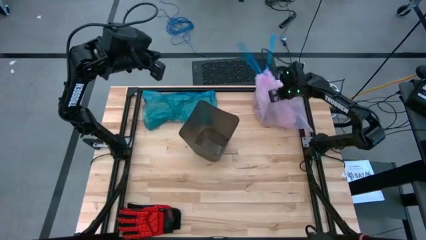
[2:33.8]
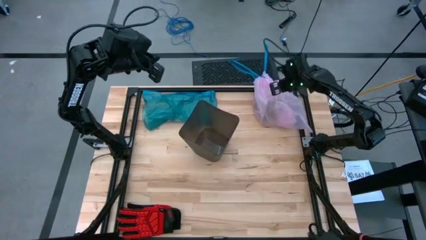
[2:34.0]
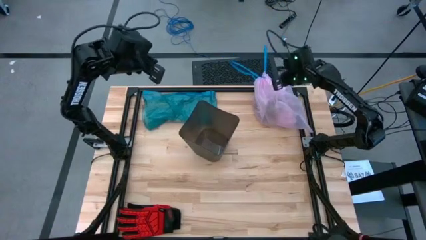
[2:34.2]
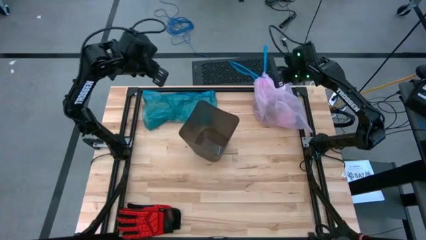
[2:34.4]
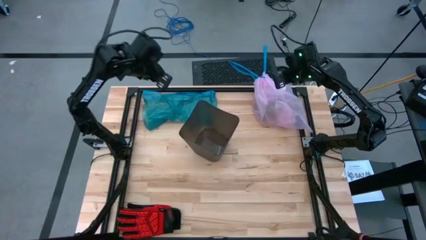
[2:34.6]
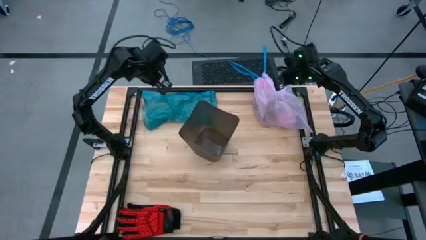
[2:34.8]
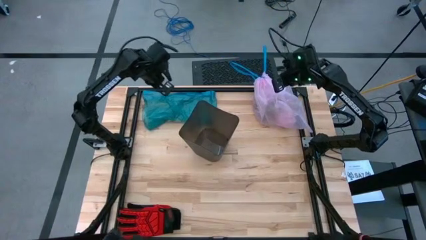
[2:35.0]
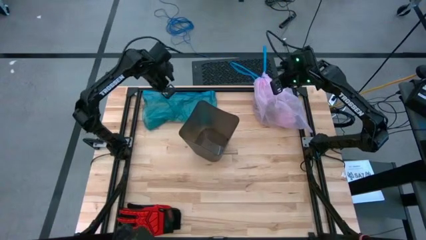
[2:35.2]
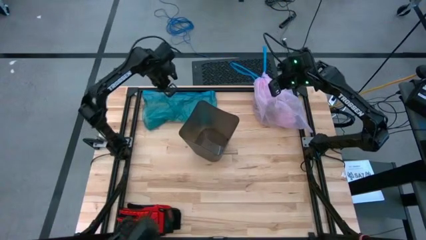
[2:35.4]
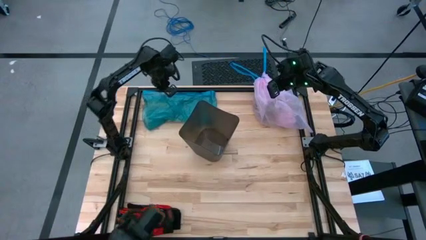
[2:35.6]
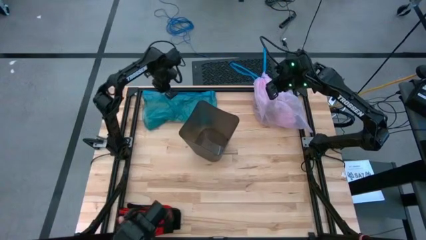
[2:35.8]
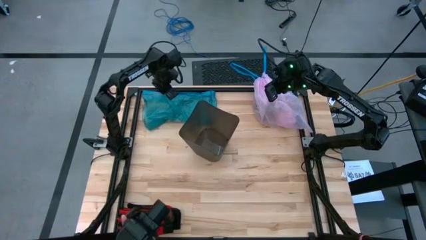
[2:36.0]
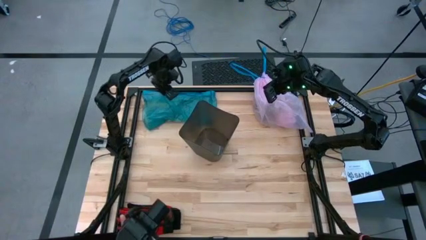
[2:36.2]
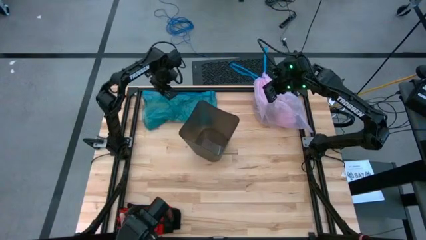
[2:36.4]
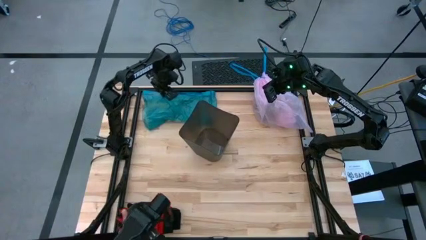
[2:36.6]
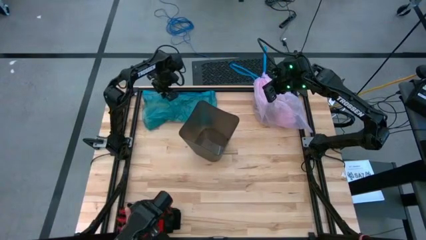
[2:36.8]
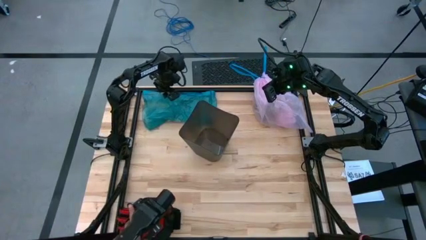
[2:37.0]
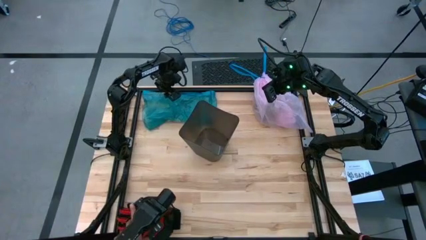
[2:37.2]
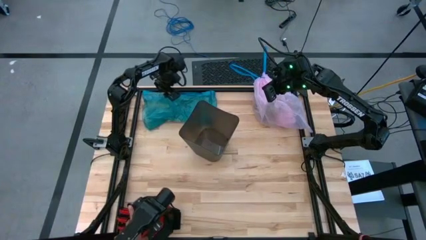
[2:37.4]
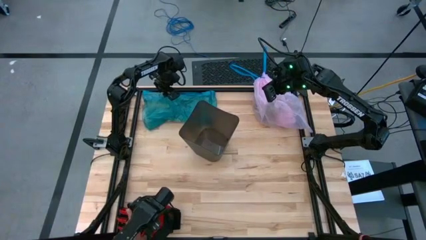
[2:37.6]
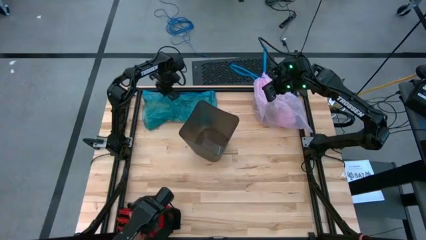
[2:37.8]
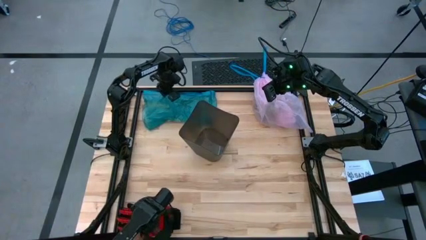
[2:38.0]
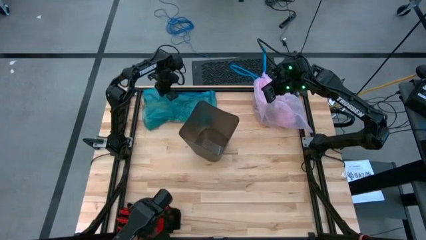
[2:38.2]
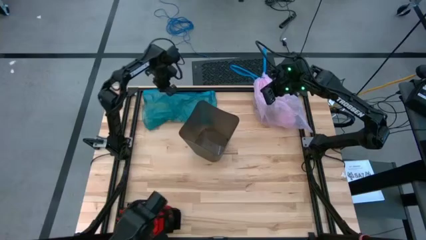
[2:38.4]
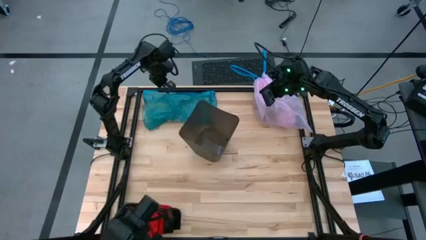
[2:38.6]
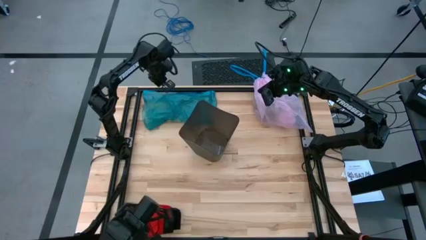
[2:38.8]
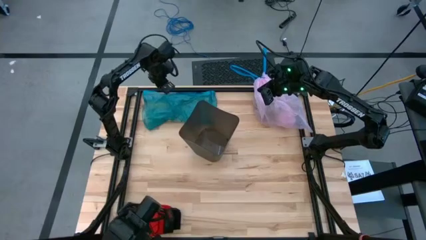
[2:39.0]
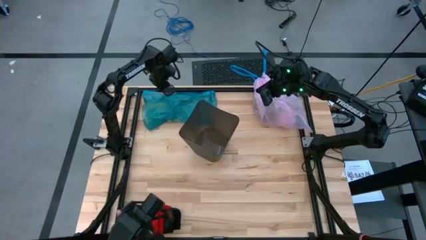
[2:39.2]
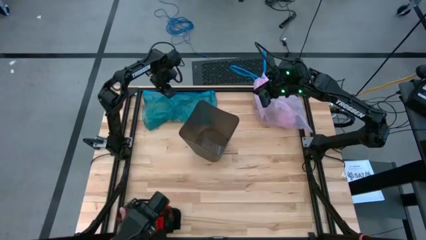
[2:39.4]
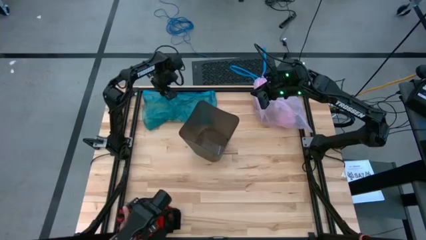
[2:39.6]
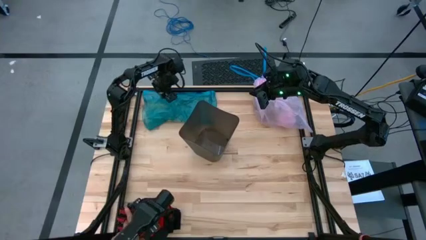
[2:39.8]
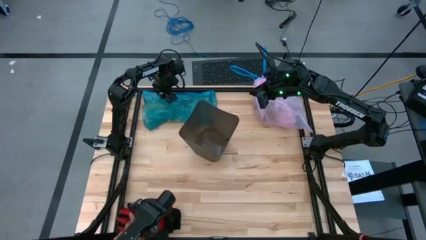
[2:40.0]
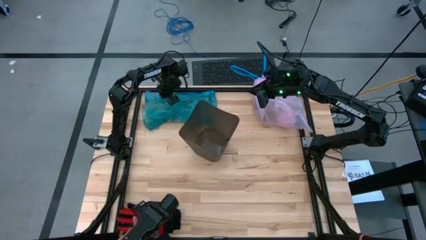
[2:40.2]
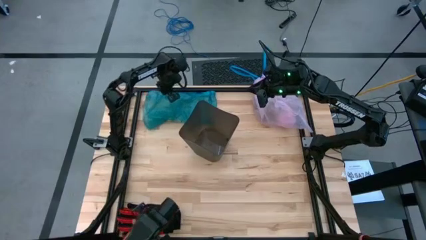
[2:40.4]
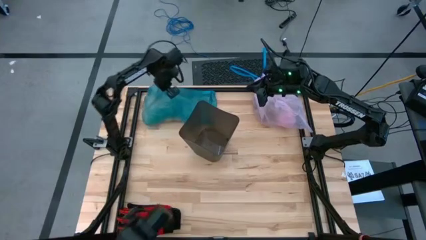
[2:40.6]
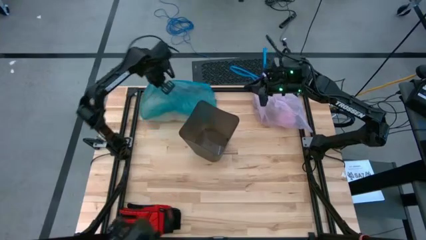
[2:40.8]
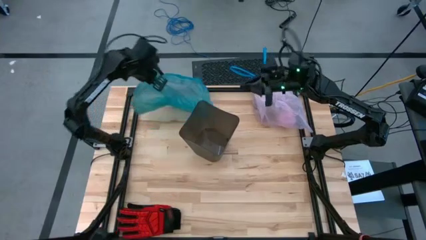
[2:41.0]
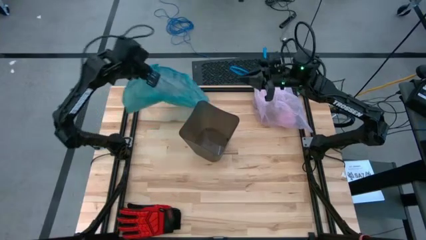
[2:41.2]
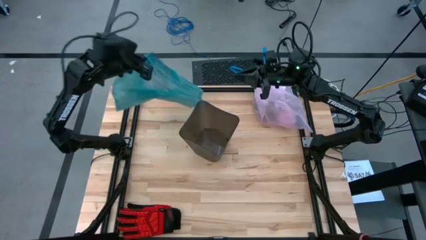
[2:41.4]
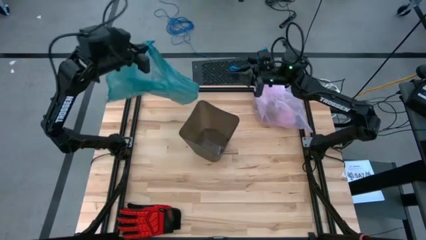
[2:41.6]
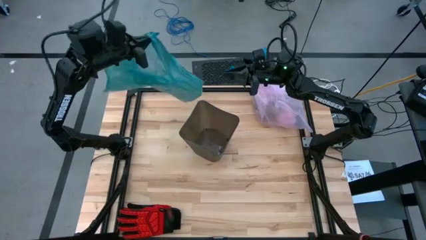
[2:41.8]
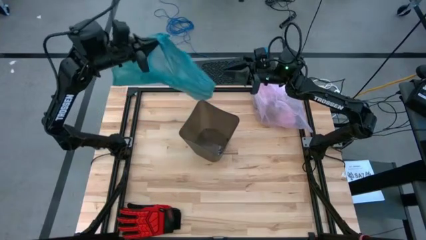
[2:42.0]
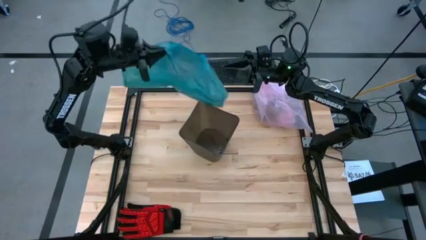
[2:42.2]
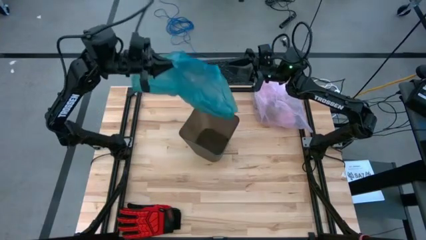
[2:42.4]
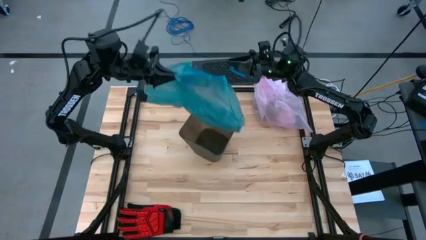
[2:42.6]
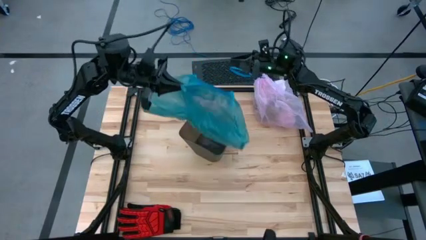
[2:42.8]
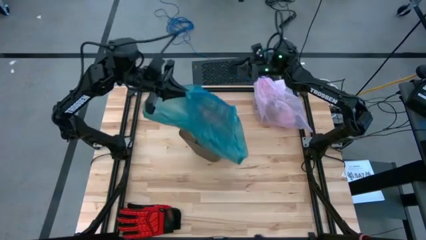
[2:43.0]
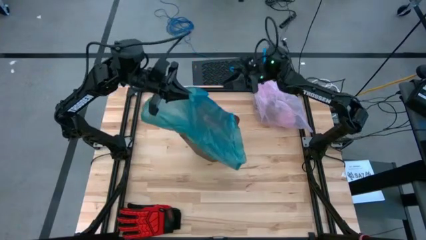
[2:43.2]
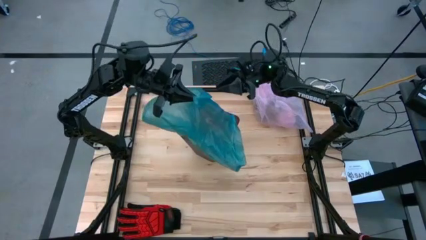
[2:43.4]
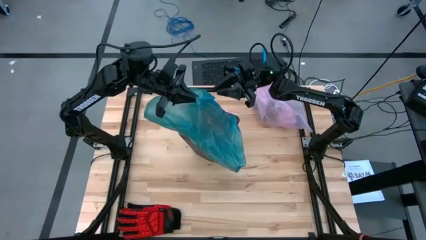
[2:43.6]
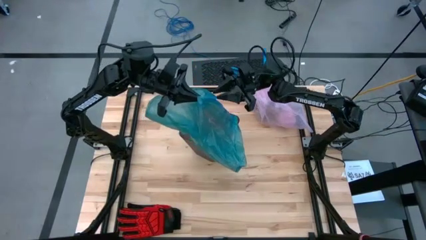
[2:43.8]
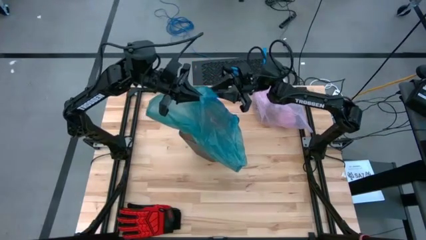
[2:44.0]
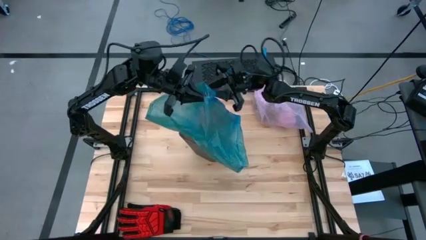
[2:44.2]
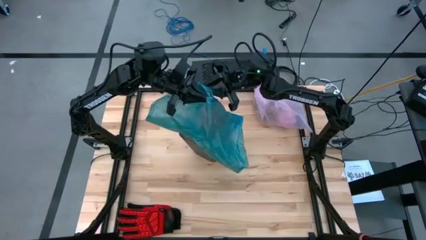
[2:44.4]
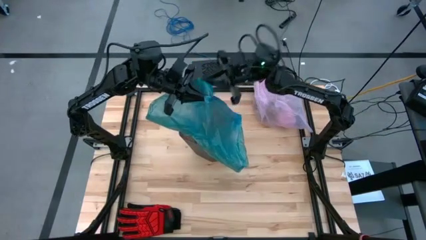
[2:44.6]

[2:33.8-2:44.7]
Task: place trash/remove bag and relplace
Insert the blue trash bag into the black trash bin
